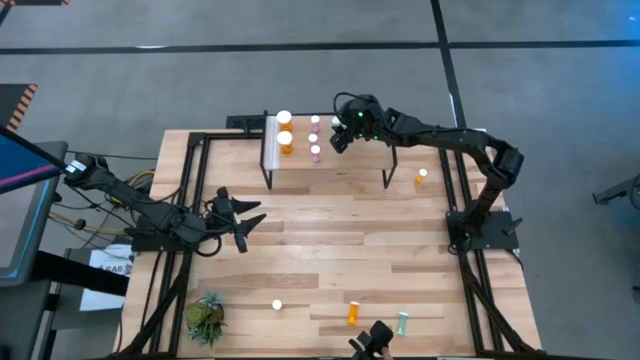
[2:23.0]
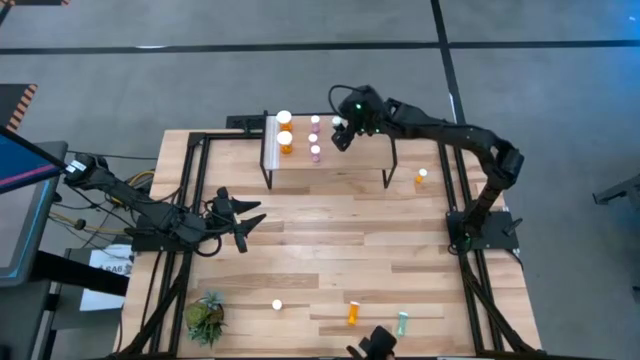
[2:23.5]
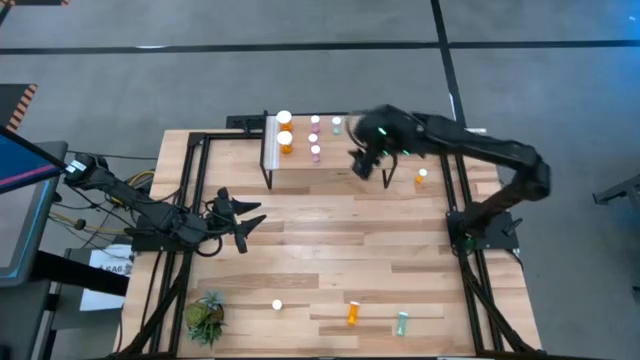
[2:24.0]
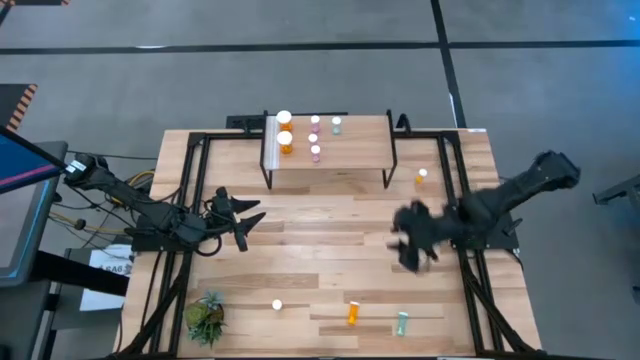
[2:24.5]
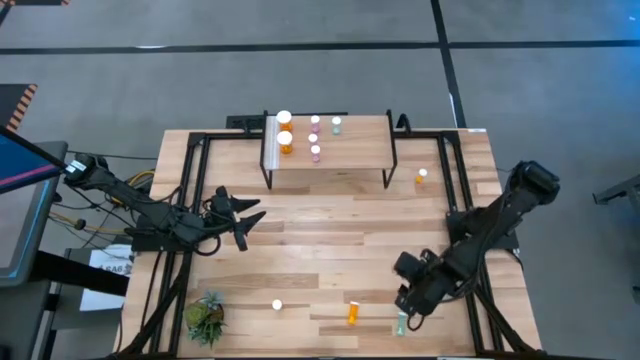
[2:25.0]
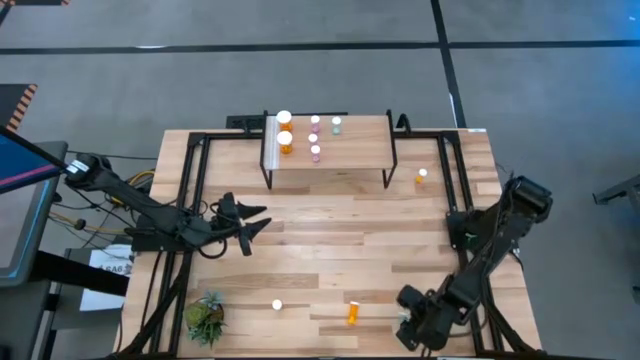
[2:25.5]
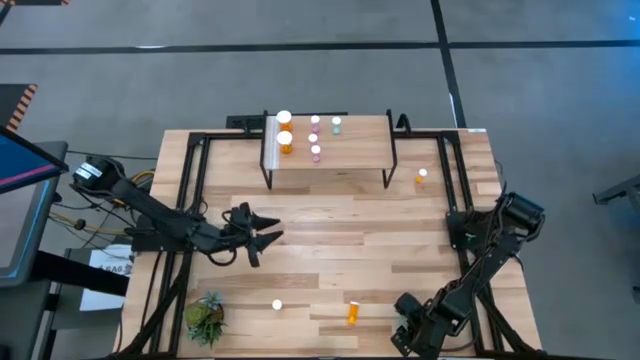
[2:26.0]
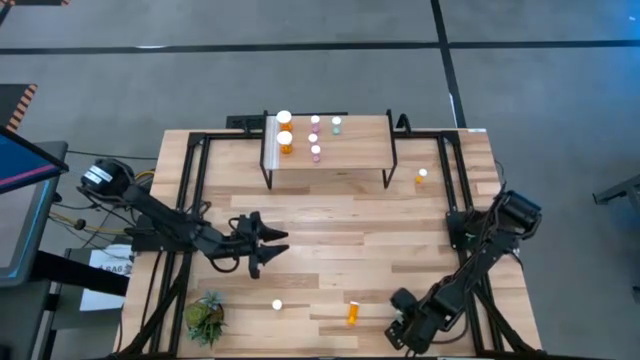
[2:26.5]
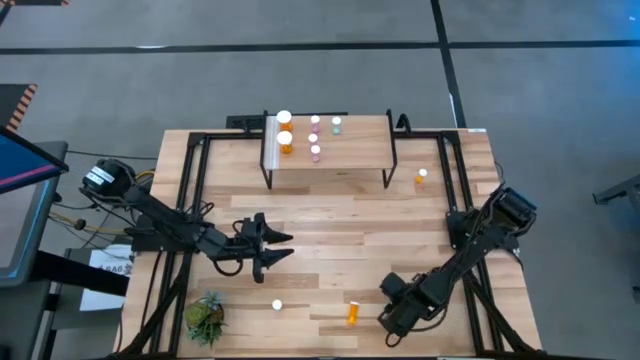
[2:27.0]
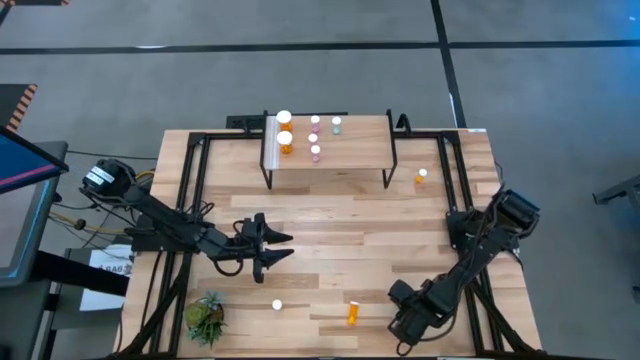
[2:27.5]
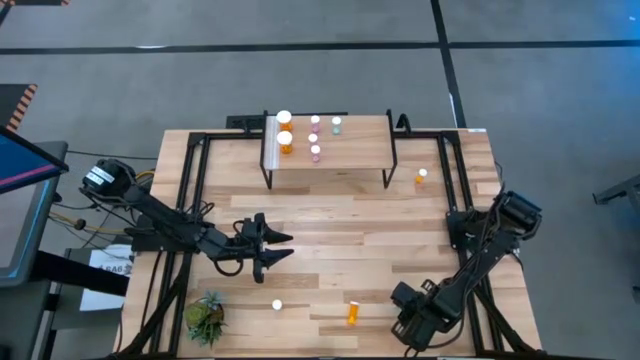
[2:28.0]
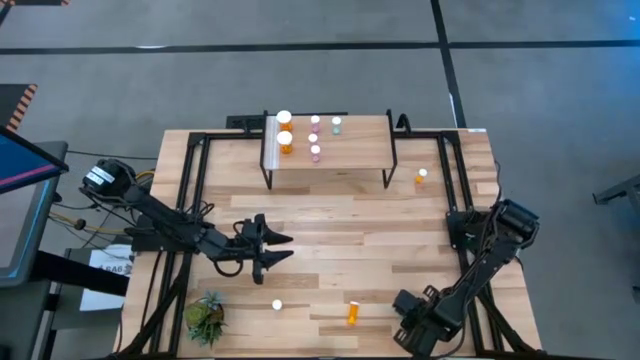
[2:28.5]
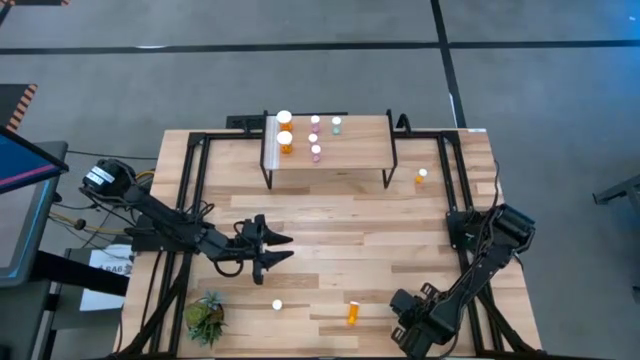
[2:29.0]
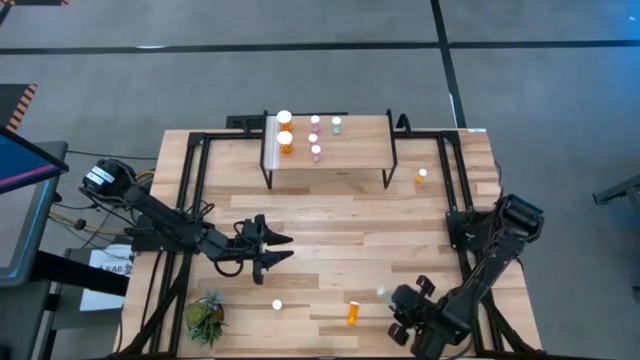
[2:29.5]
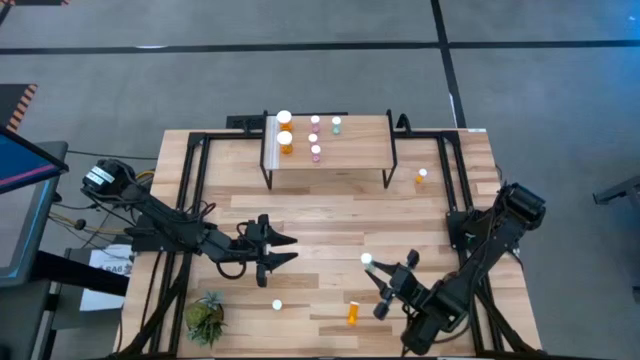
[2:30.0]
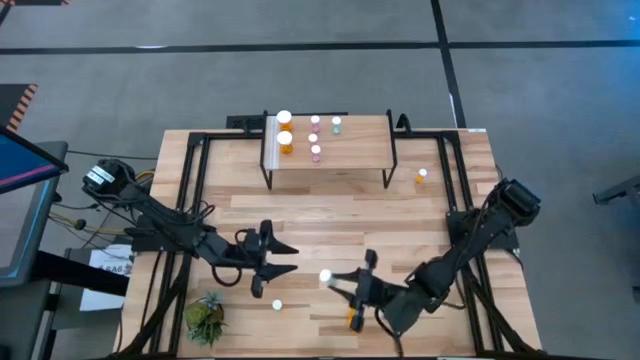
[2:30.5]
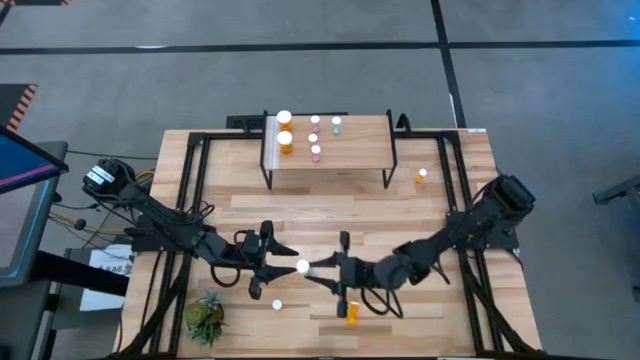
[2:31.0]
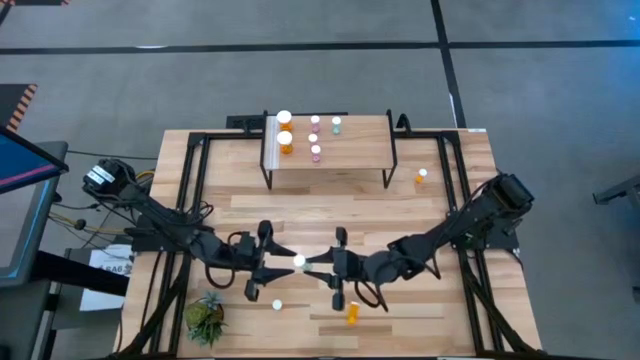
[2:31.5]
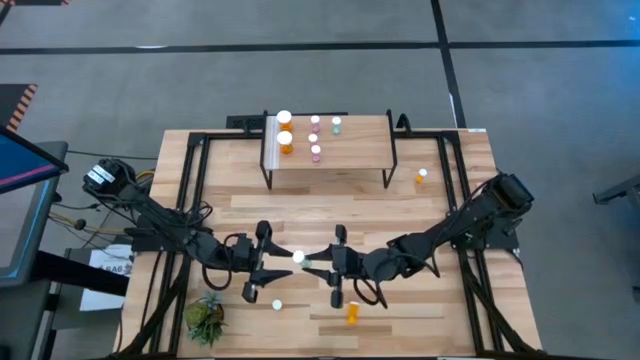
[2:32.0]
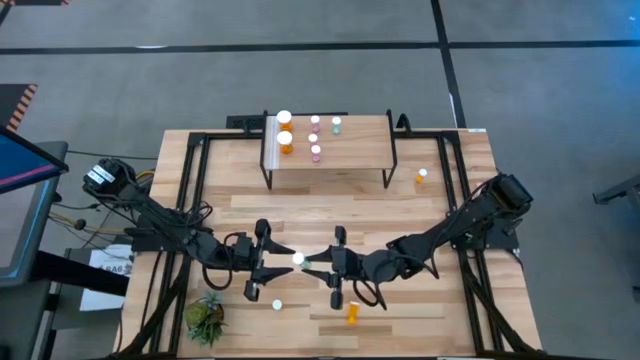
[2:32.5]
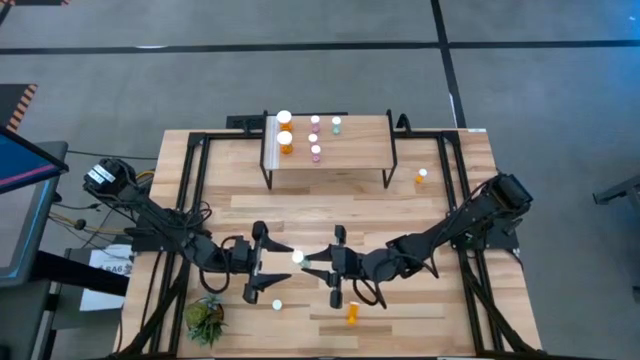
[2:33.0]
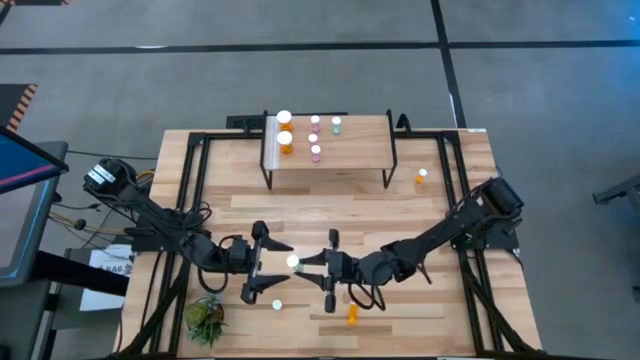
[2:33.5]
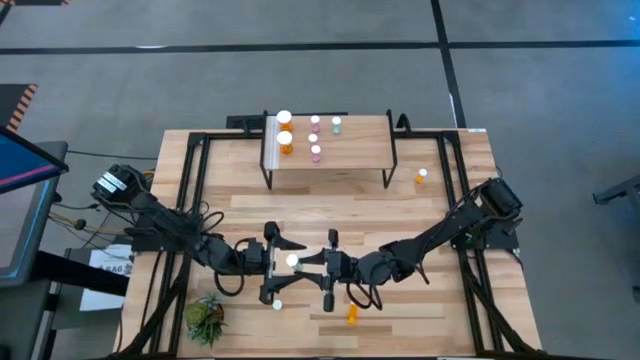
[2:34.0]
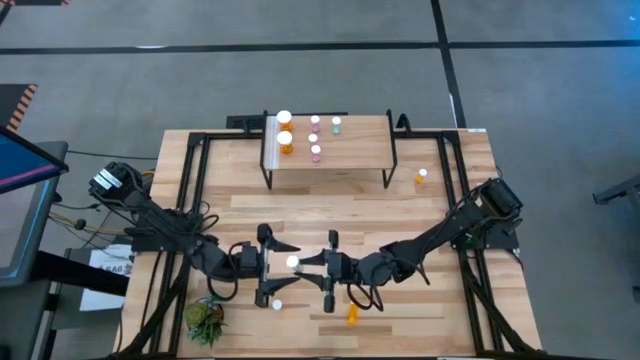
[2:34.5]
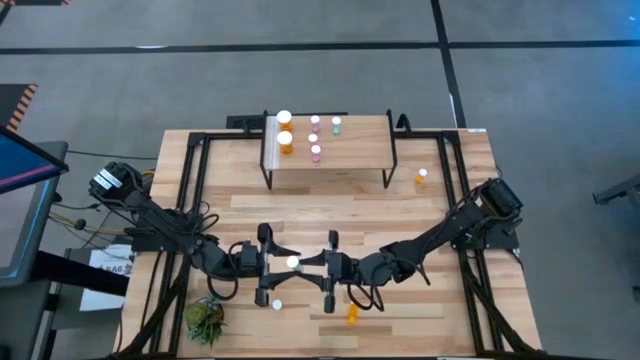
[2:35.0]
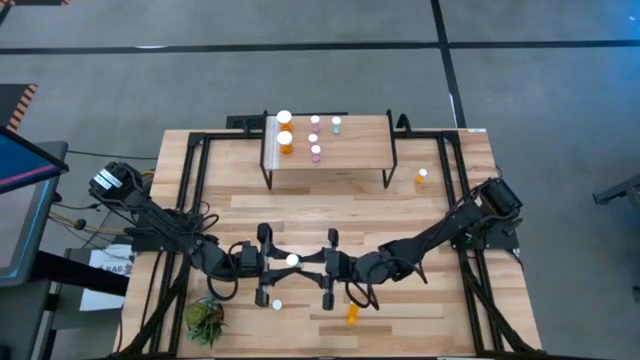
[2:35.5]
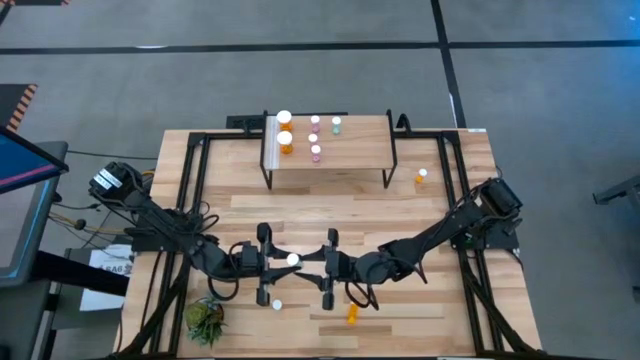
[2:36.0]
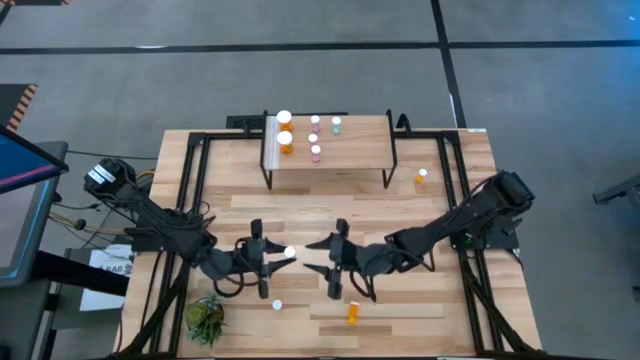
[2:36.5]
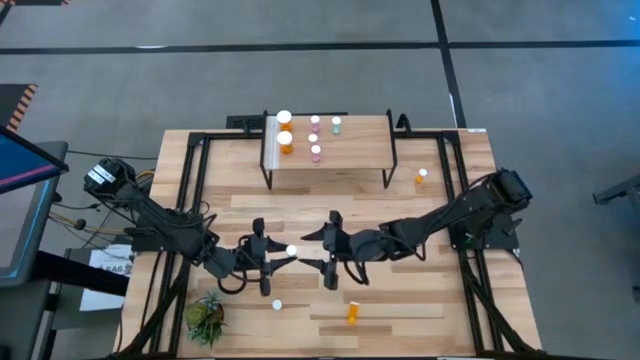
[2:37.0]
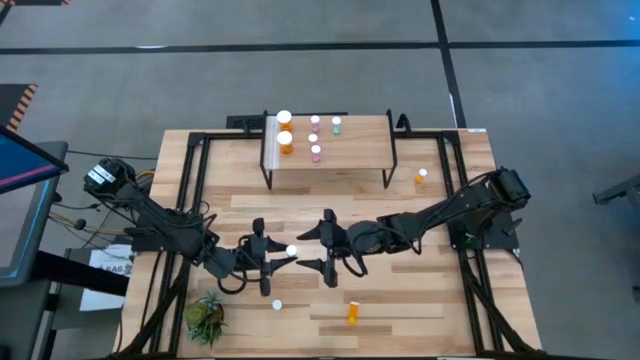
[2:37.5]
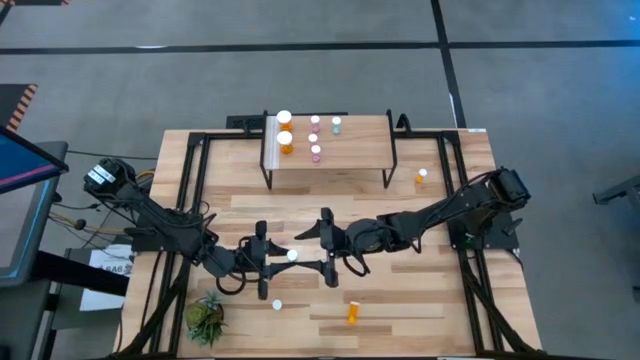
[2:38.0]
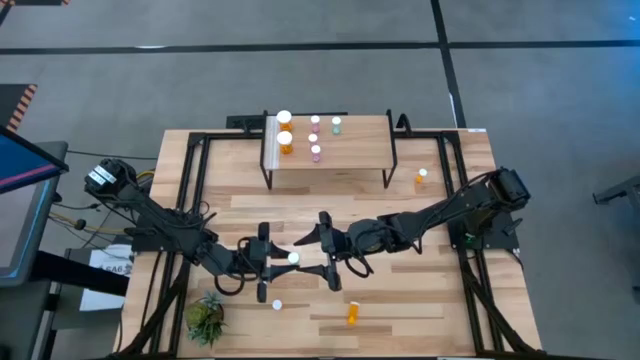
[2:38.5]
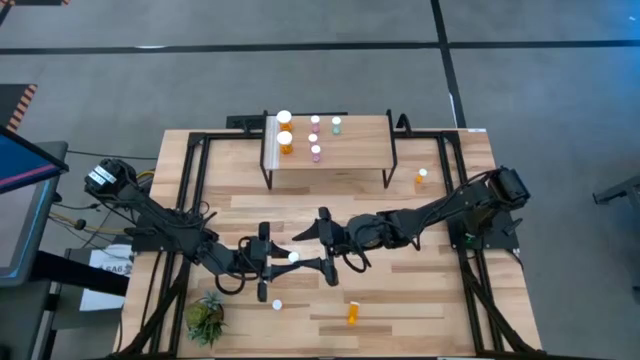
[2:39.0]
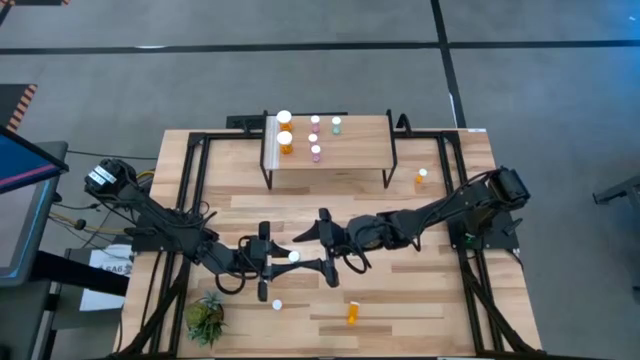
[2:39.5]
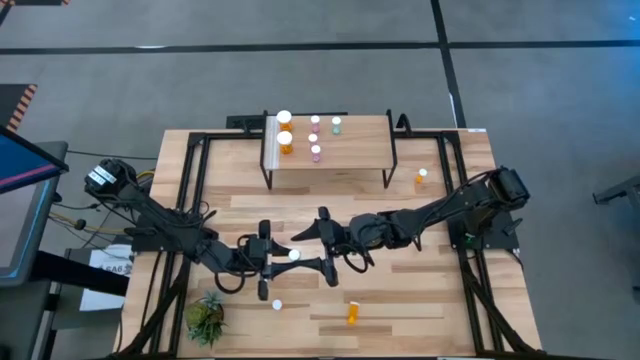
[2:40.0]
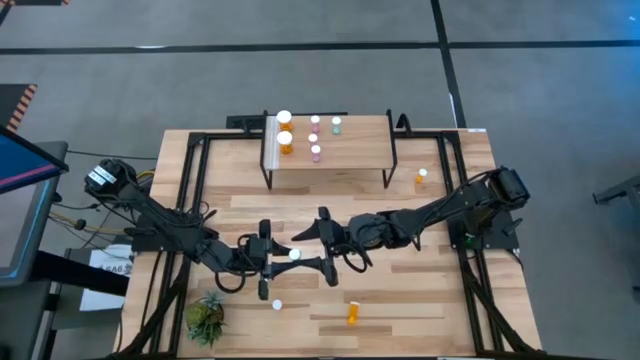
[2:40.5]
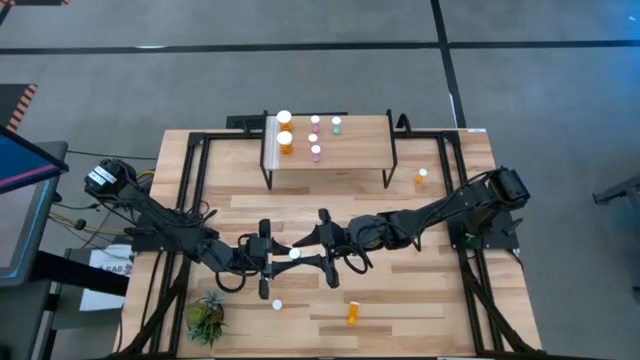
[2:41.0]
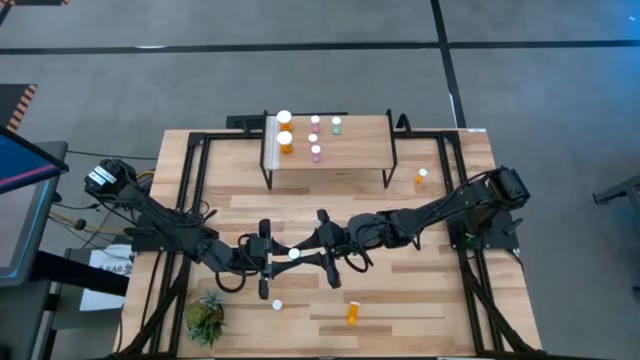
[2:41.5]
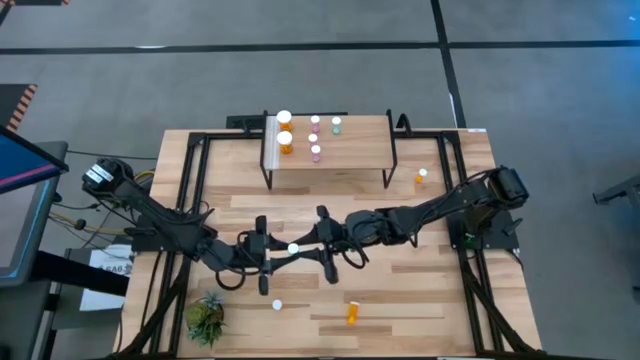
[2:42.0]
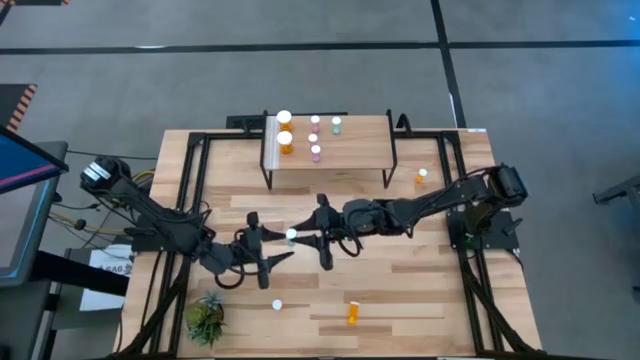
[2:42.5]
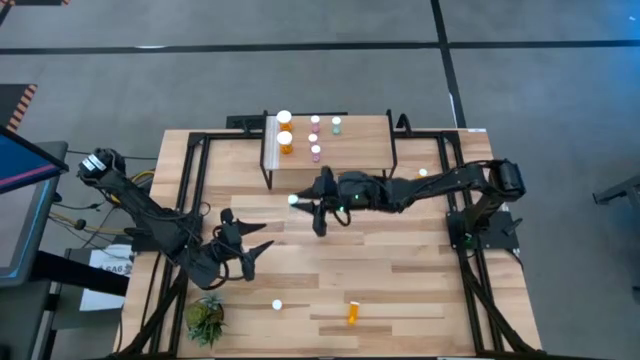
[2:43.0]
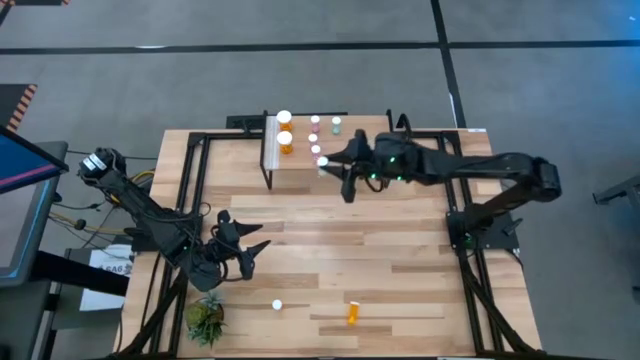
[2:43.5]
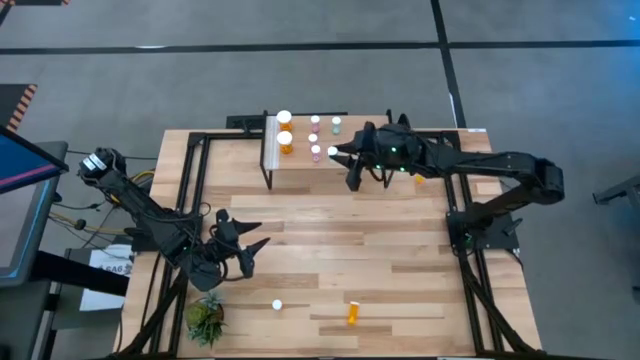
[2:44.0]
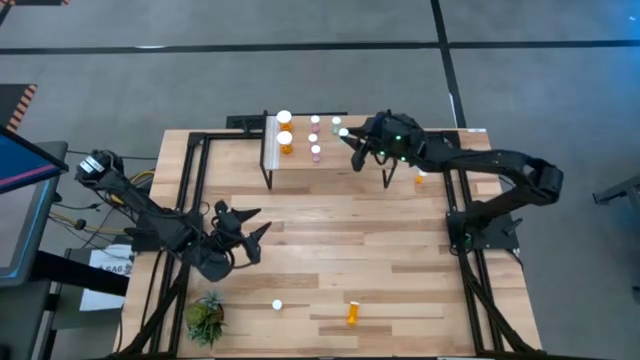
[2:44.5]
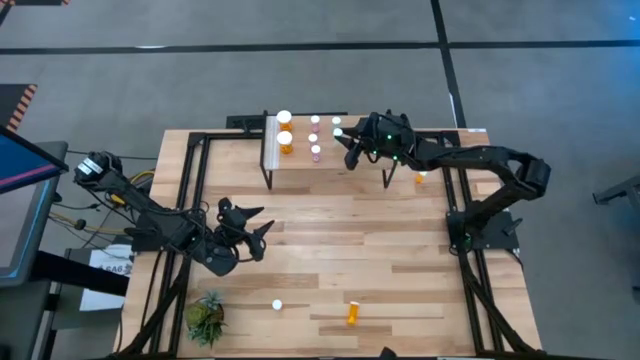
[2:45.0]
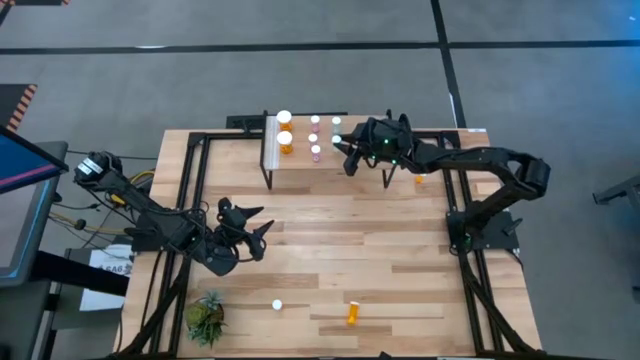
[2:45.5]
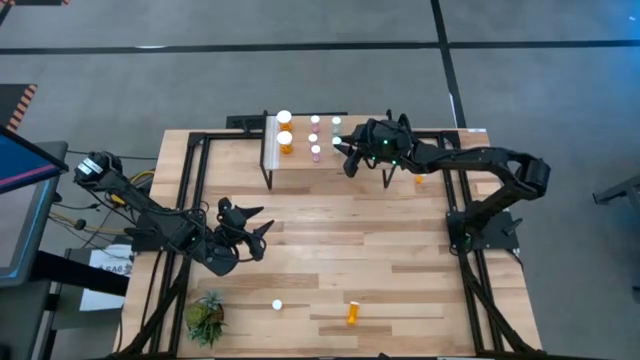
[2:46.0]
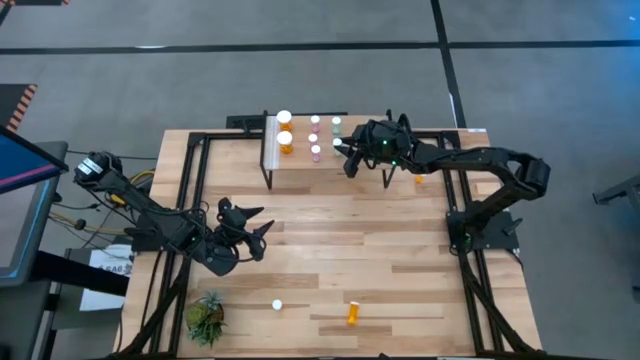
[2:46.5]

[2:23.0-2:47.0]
Task: Pick and place medicine bottles onto shelf by color
Put the blue pill bottle on the shelf aligned with the other blue pill bottle
